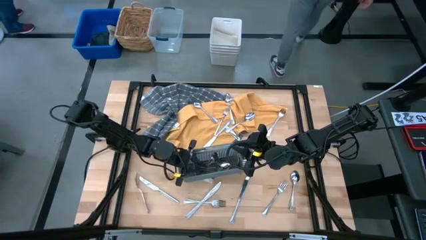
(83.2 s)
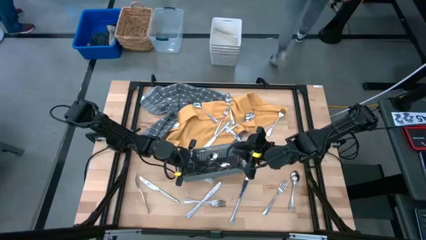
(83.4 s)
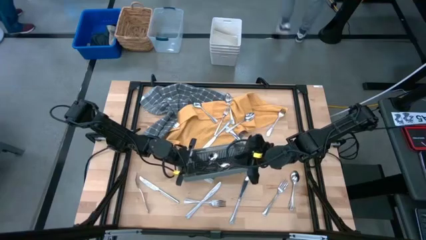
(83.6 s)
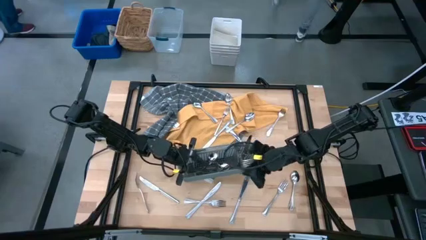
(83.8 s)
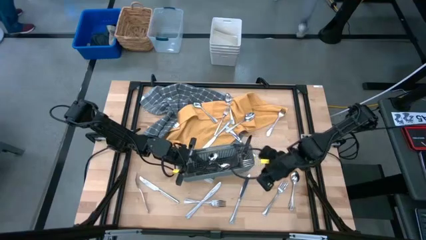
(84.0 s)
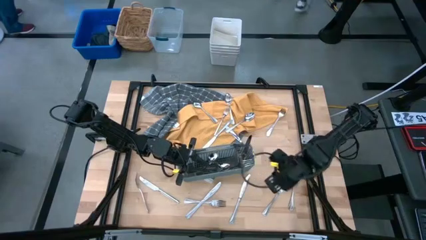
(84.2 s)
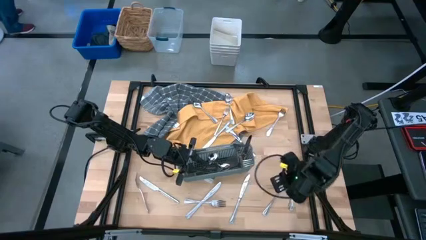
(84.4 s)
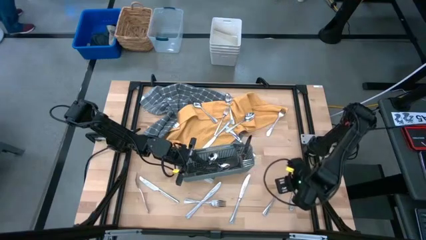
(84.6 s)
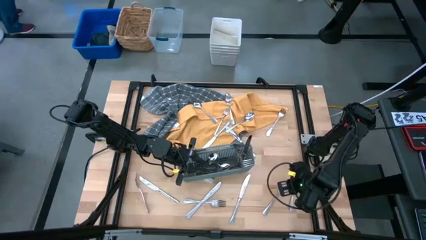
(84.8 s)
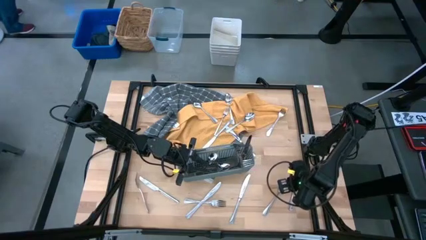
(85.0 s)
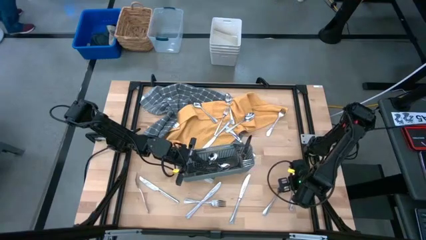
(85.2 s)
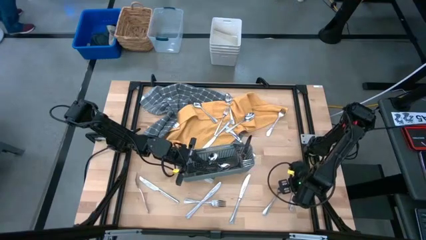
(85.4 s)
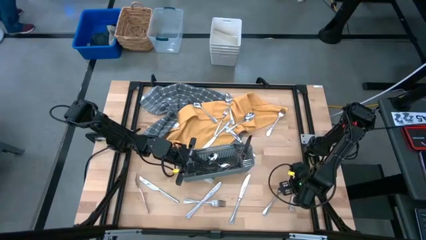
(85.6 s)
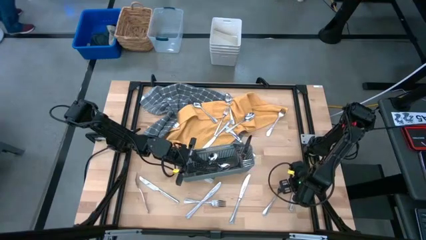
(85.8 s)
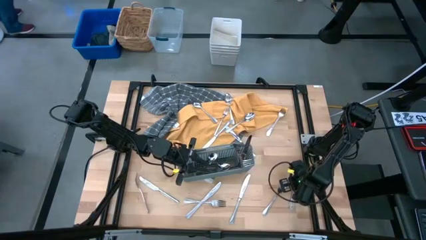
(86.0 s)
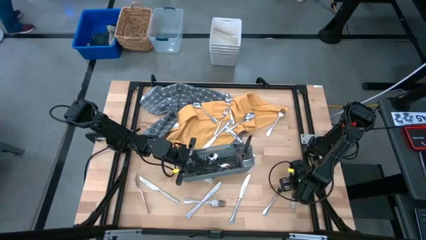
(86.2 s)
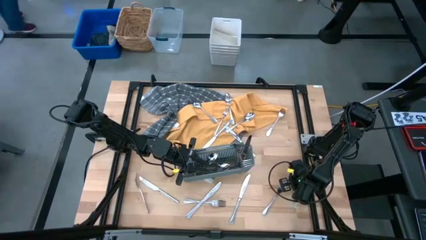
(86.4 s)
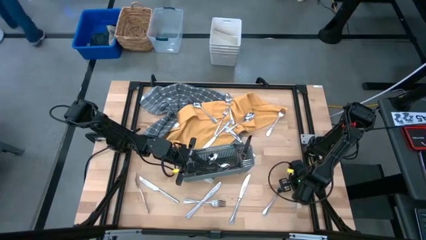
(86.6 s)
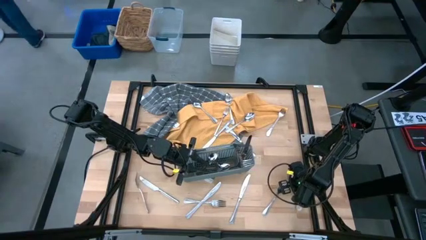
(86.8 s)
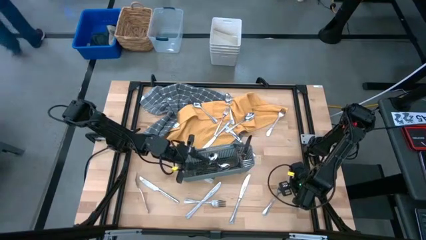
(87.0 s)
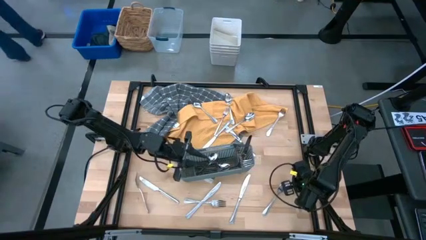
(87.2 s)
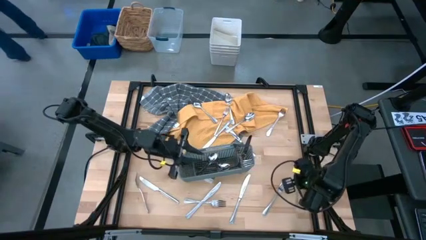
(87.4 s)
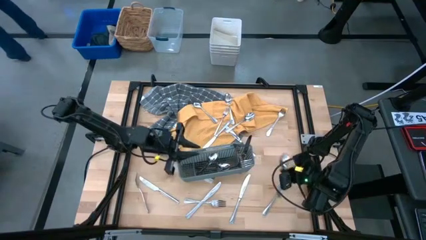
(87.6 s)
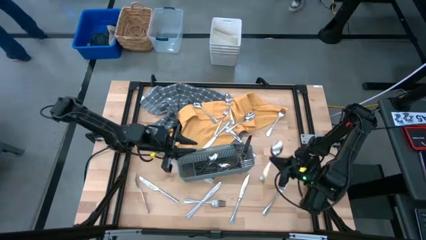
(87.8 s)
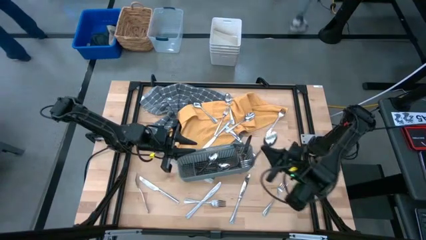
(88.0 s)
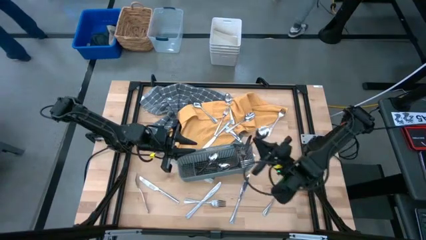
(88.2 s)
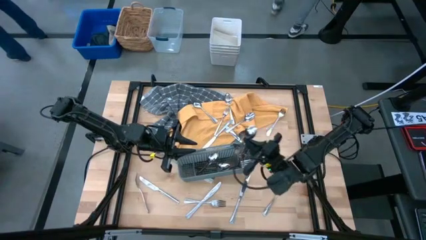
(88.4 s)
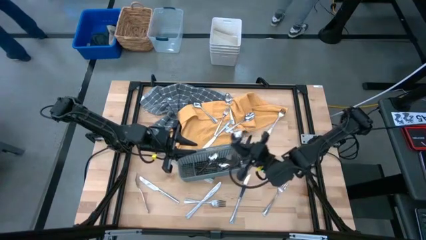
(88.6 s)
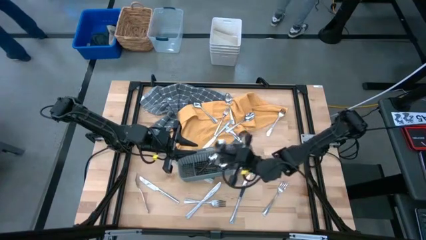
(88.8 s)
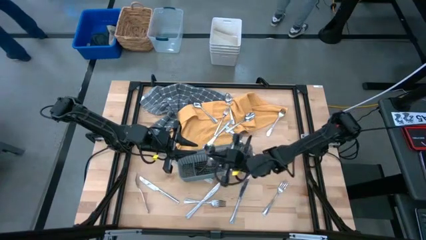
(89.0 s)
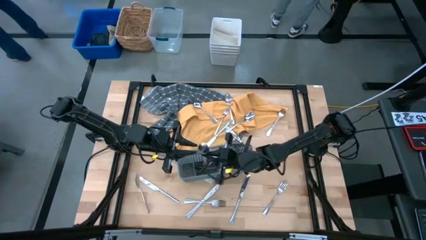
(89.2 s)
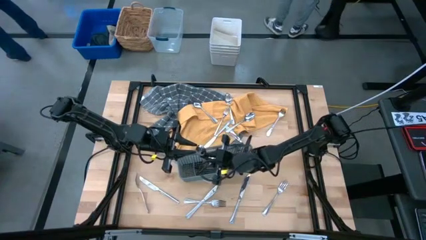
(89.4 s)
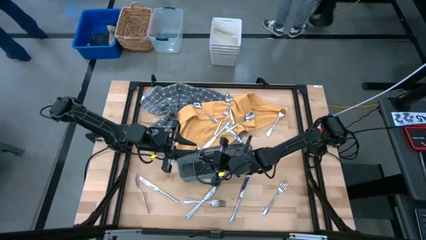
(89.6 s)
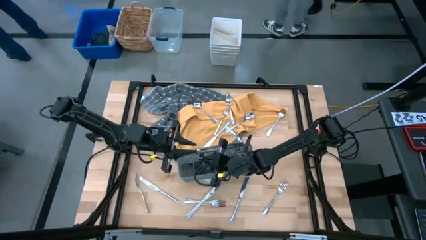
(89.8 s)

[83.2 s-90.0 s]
Task: Sort silverware
Put the silver spoon into the gray silverware basket

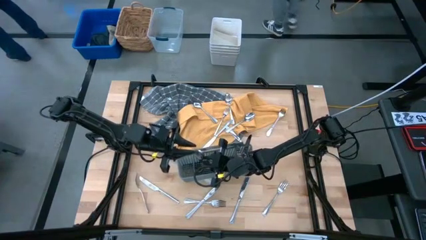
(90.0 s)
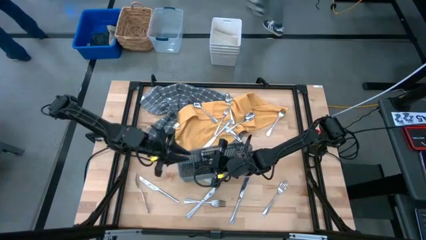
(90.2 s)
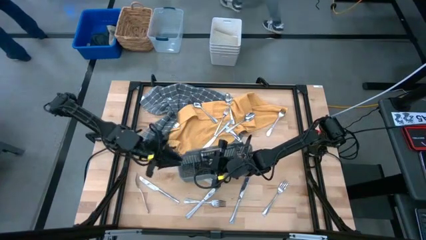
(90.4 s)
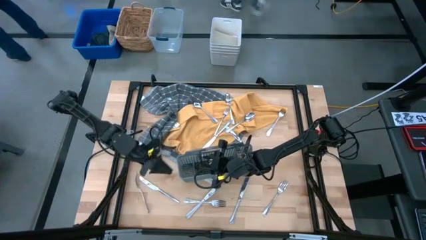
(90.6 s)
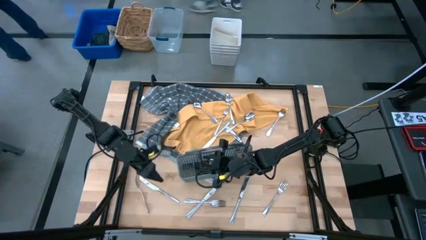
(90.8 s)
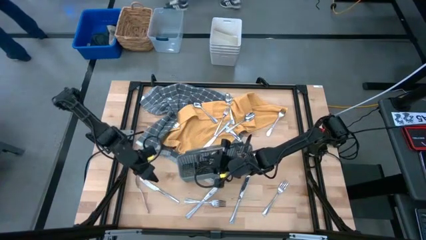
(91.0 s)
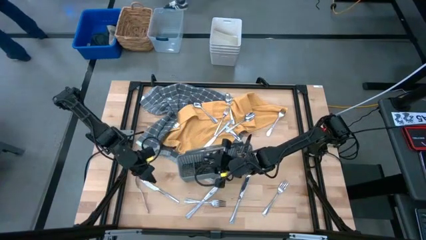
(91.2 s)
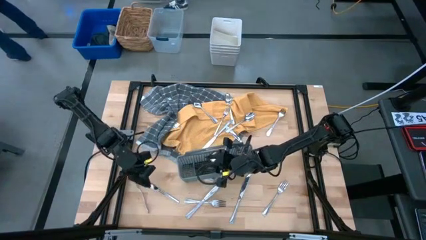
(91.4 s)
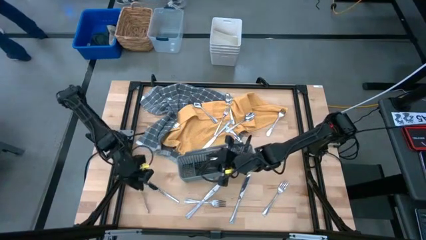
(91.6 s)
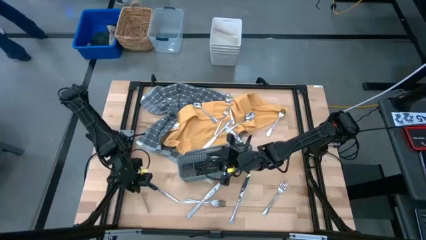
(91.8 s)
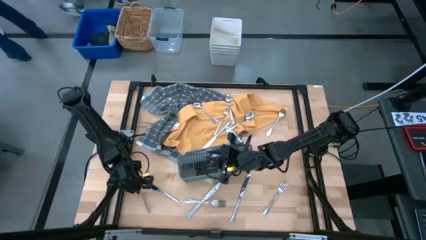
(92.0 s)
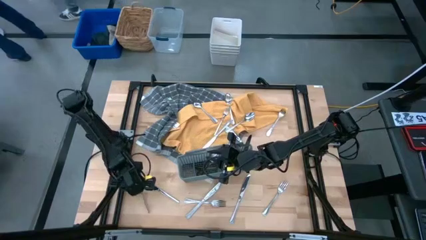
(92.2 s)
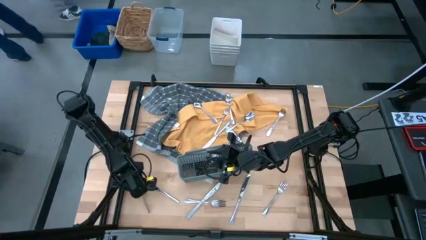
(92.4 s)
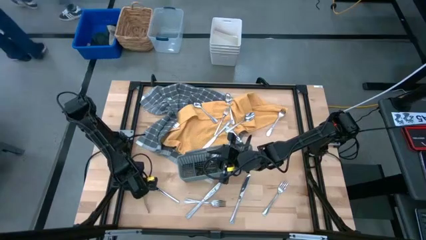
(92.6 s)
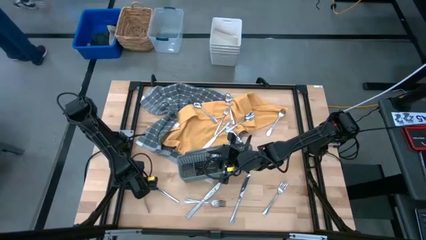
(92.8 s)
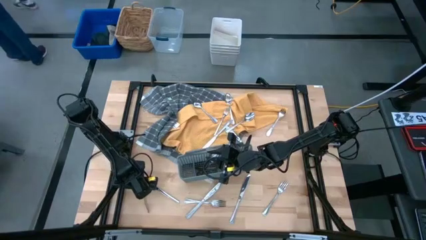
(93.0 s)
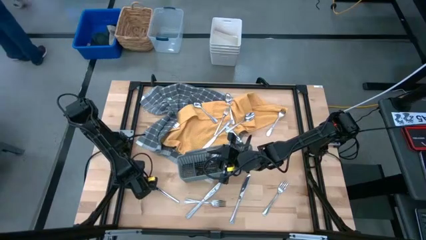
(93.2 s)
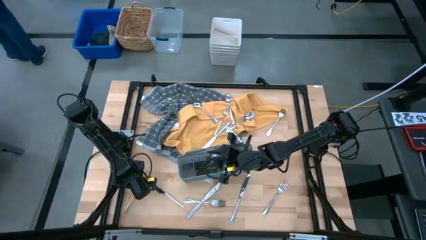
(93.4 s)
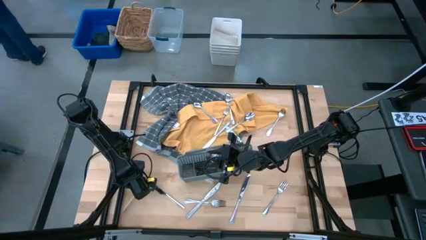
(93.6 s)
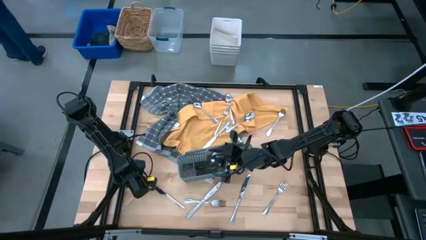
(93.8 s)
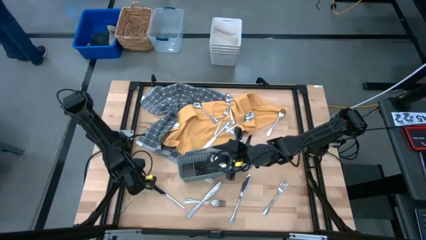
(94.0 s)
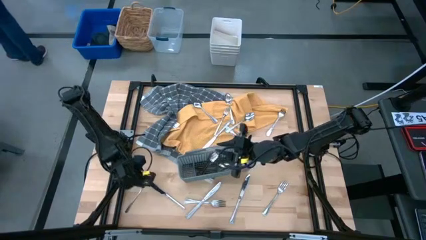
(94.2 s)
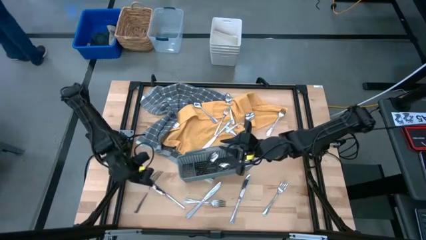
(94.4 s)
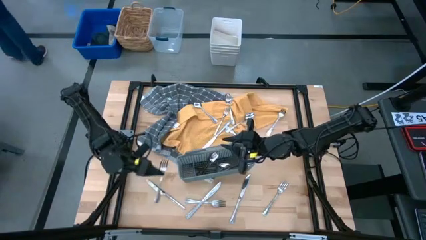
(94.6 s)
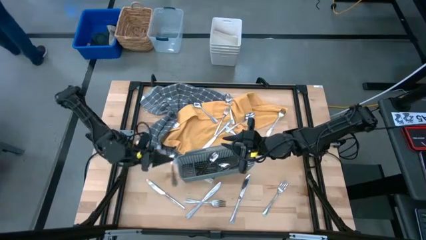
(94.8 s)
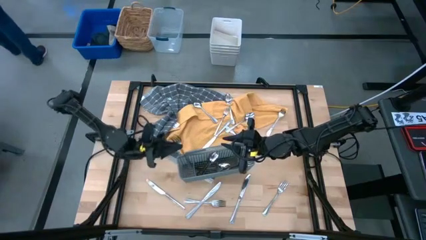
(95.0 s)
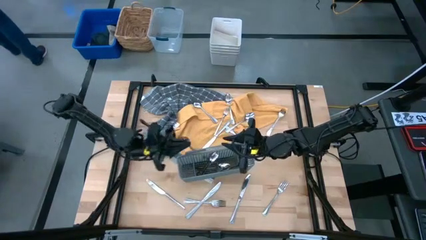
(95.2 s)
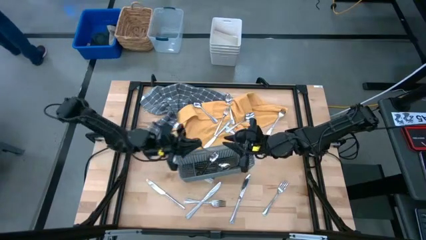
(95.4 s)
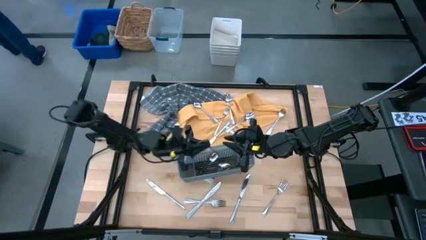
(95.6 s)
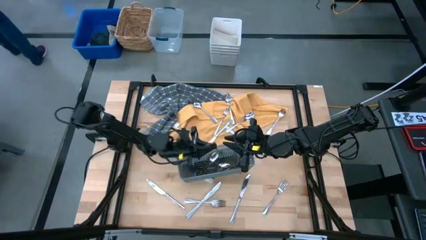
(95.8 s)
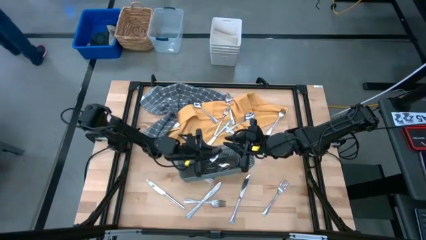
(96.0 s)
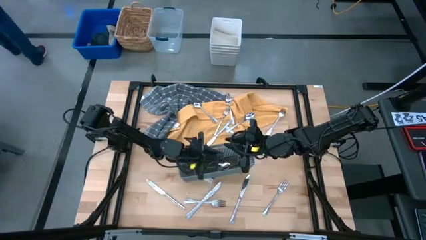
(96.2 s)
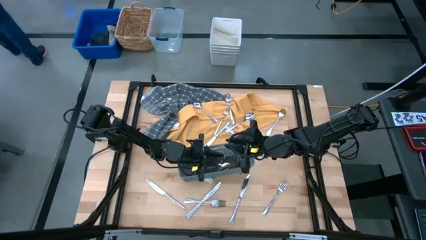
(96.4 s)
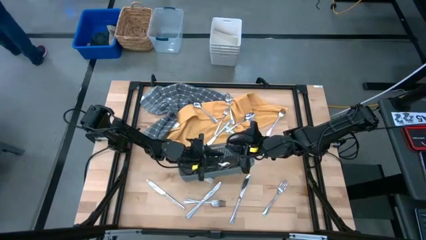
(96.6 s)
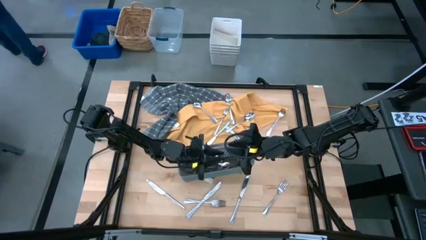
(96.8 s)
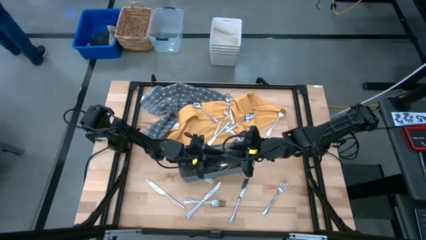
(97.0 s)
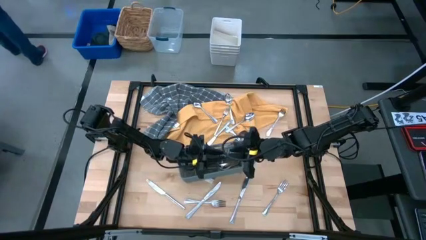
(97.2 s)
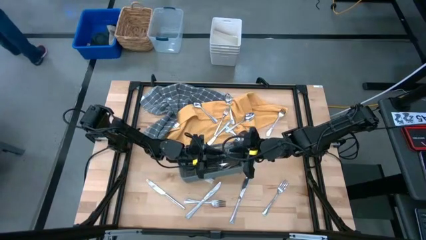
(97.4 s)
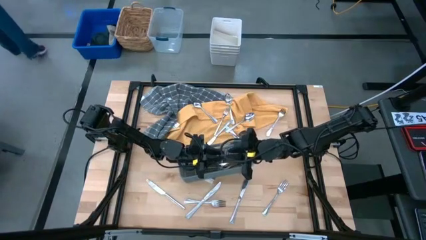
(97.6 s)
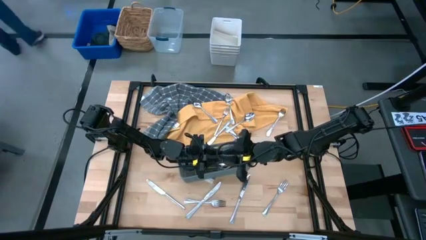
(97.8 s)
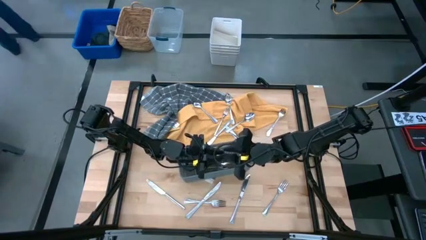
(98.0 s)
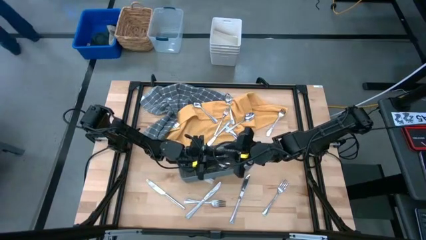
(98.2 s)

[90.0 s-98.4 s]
Put the silver fork into the gray silverware basket
